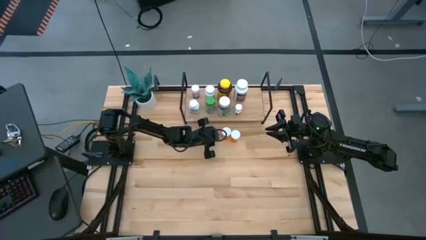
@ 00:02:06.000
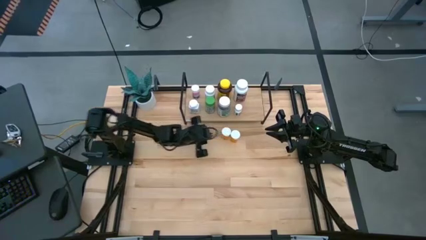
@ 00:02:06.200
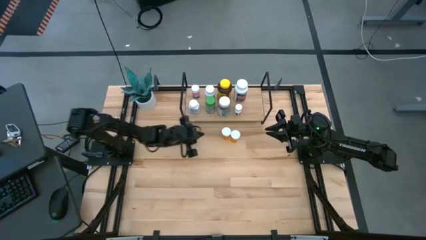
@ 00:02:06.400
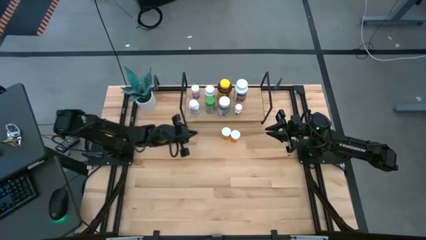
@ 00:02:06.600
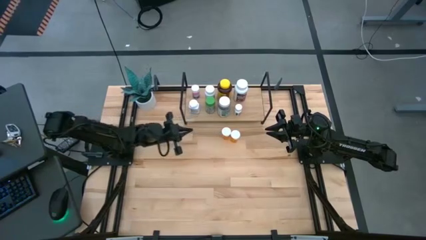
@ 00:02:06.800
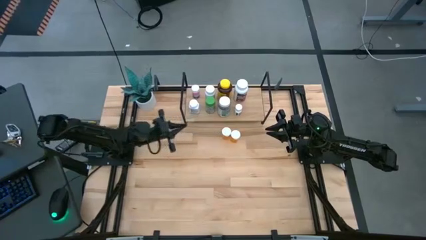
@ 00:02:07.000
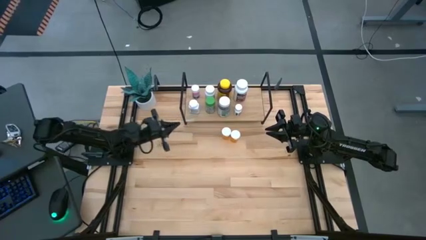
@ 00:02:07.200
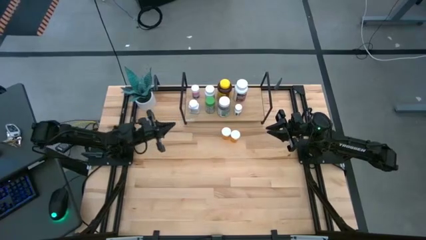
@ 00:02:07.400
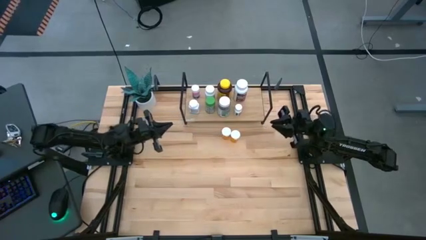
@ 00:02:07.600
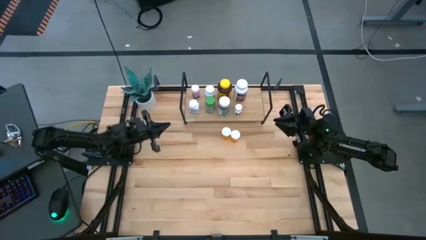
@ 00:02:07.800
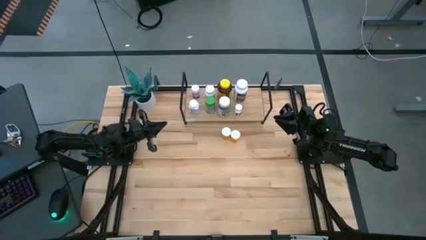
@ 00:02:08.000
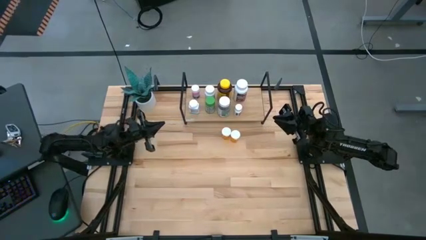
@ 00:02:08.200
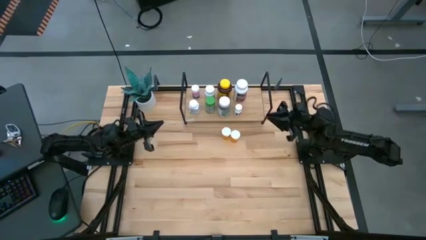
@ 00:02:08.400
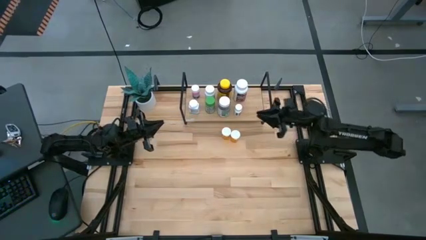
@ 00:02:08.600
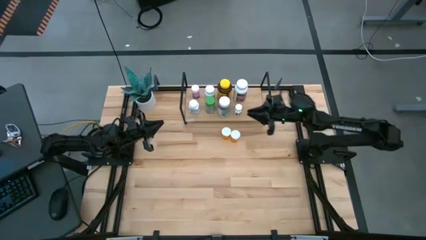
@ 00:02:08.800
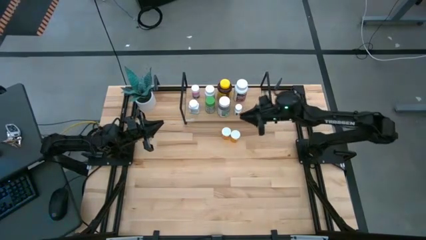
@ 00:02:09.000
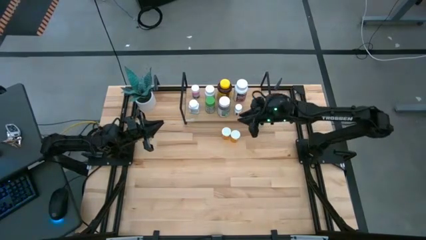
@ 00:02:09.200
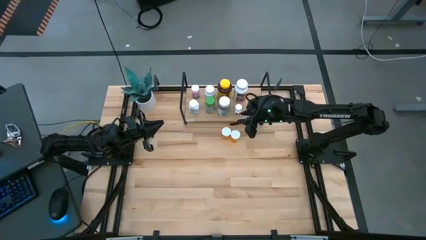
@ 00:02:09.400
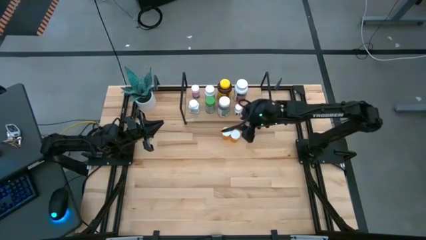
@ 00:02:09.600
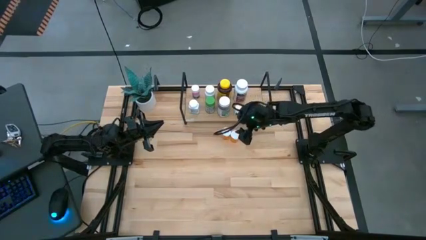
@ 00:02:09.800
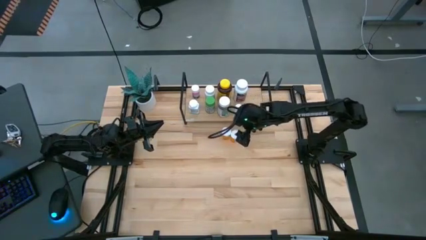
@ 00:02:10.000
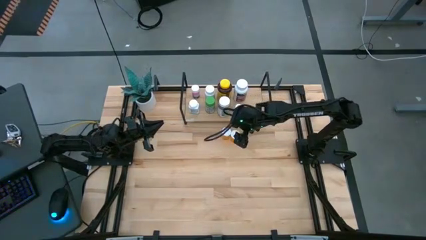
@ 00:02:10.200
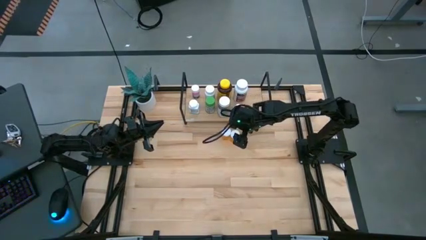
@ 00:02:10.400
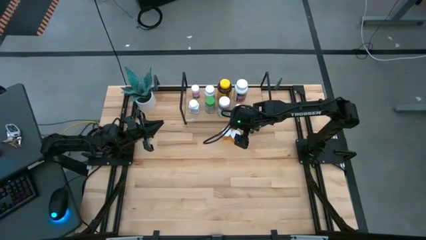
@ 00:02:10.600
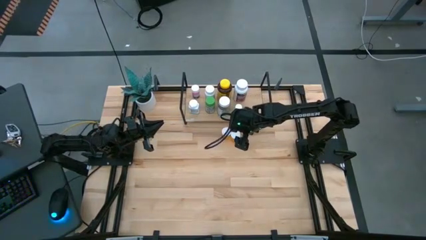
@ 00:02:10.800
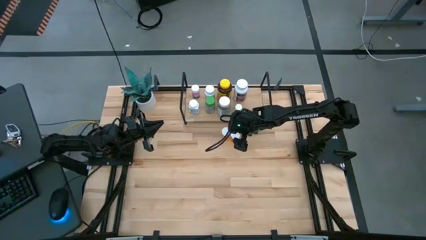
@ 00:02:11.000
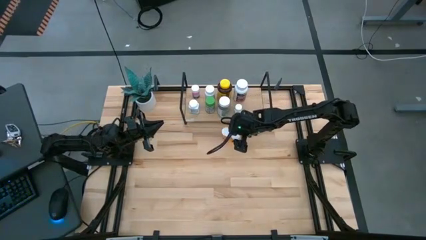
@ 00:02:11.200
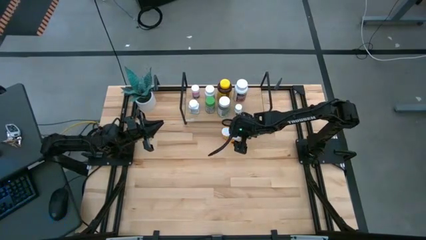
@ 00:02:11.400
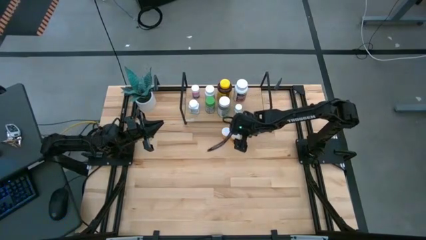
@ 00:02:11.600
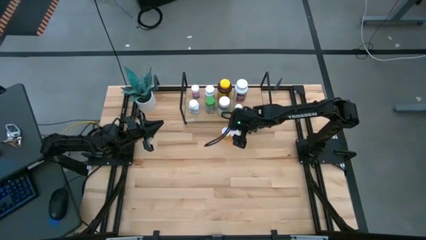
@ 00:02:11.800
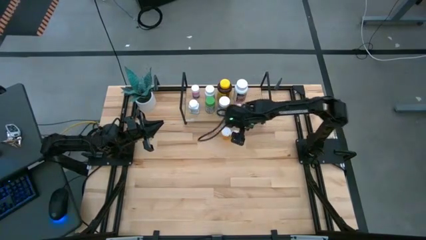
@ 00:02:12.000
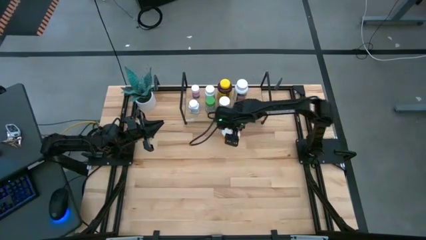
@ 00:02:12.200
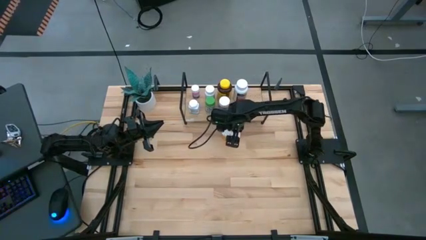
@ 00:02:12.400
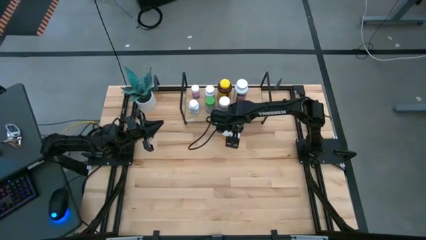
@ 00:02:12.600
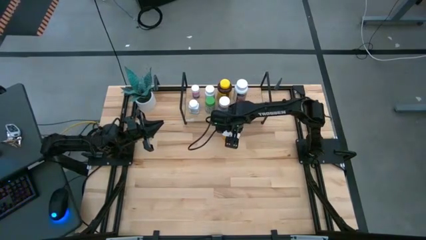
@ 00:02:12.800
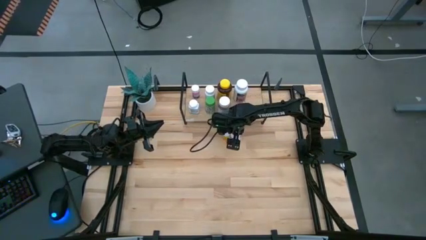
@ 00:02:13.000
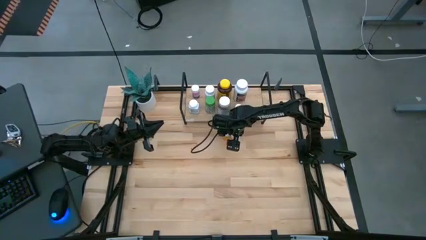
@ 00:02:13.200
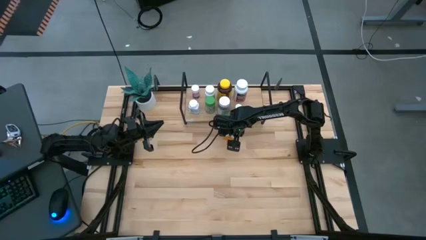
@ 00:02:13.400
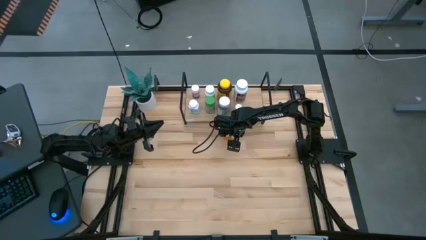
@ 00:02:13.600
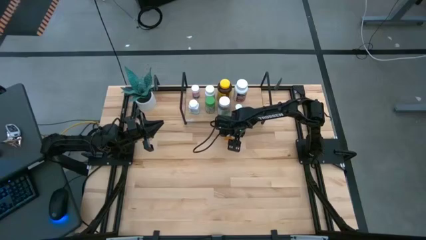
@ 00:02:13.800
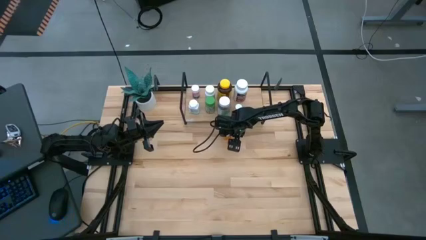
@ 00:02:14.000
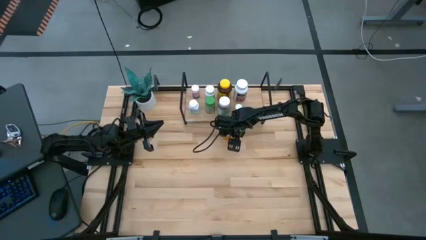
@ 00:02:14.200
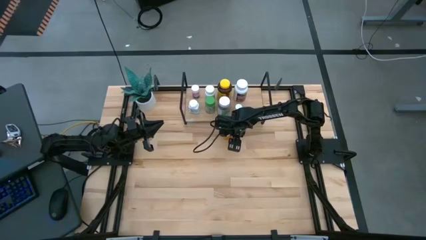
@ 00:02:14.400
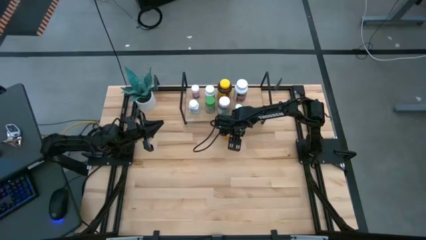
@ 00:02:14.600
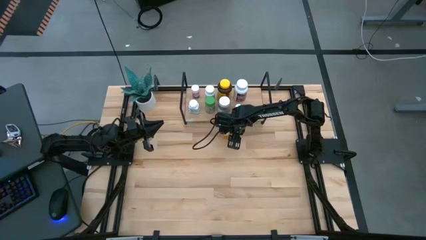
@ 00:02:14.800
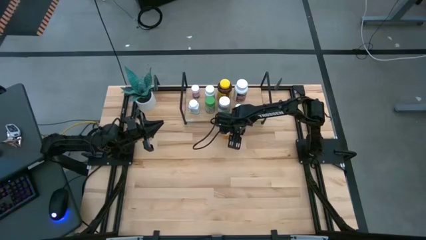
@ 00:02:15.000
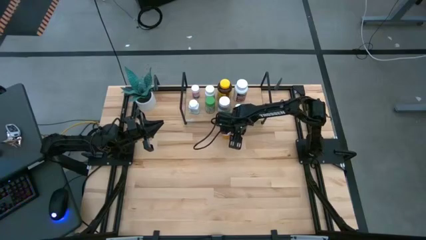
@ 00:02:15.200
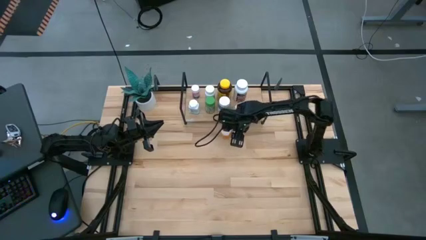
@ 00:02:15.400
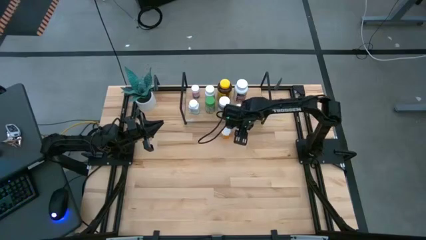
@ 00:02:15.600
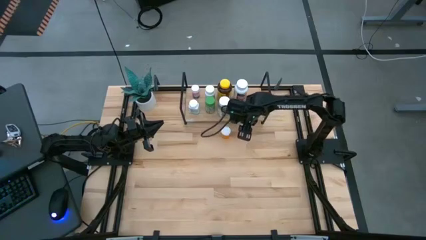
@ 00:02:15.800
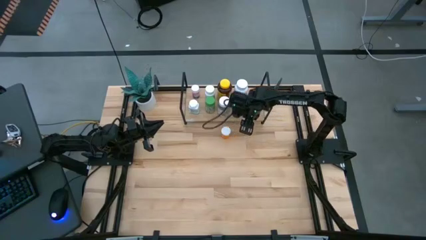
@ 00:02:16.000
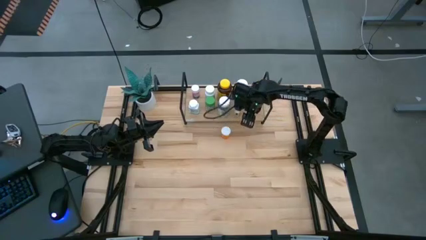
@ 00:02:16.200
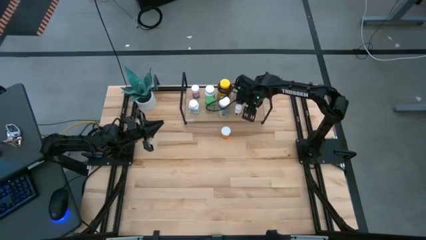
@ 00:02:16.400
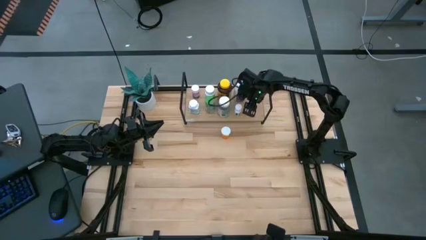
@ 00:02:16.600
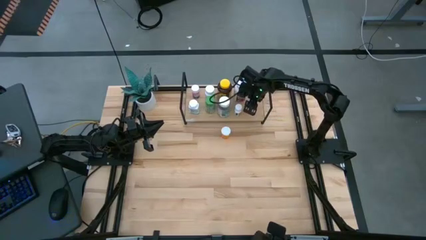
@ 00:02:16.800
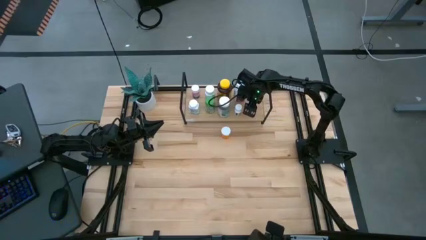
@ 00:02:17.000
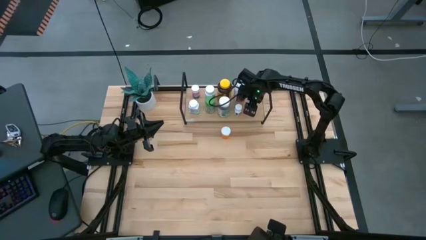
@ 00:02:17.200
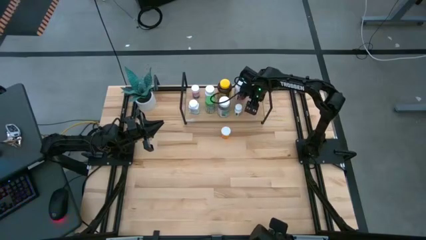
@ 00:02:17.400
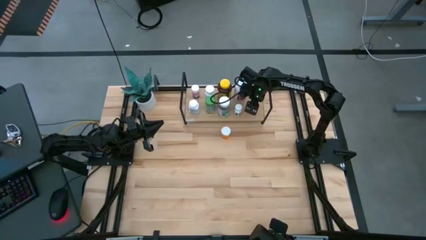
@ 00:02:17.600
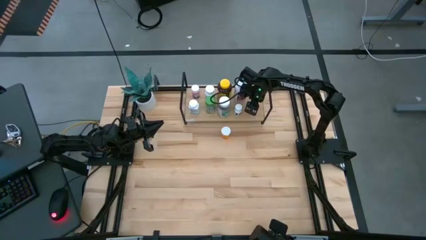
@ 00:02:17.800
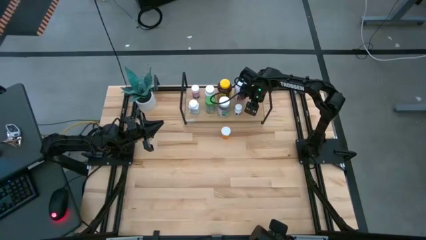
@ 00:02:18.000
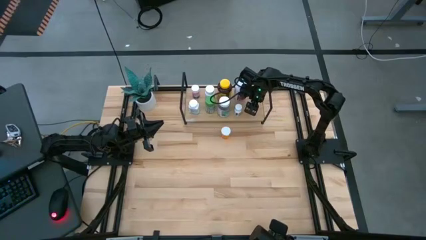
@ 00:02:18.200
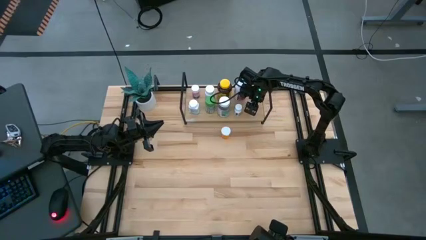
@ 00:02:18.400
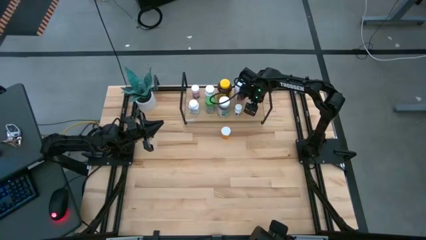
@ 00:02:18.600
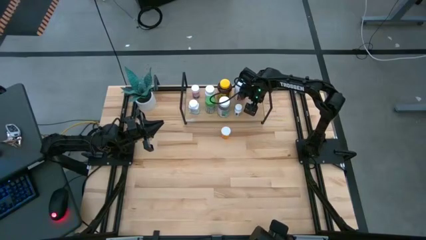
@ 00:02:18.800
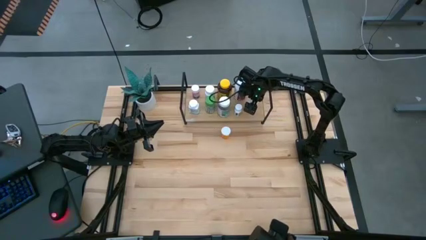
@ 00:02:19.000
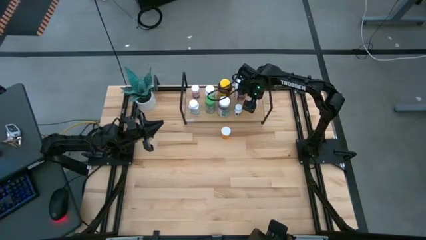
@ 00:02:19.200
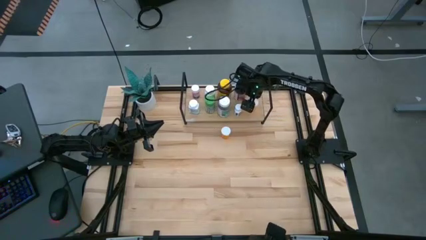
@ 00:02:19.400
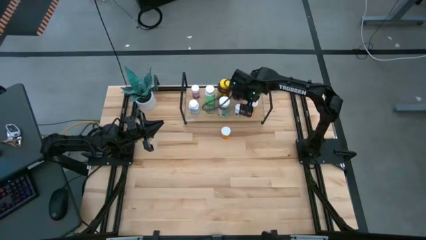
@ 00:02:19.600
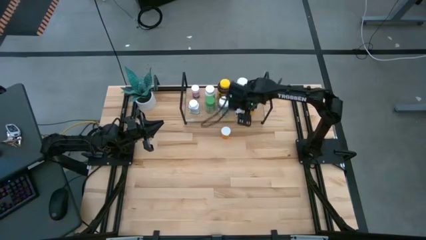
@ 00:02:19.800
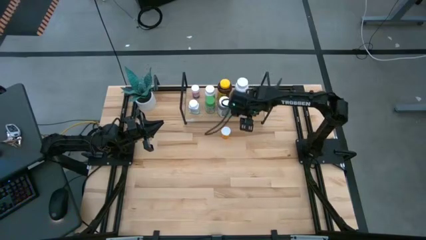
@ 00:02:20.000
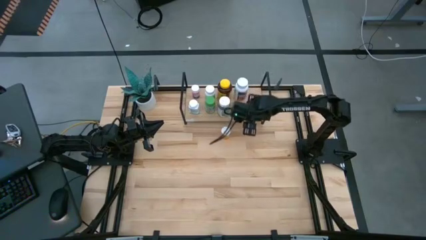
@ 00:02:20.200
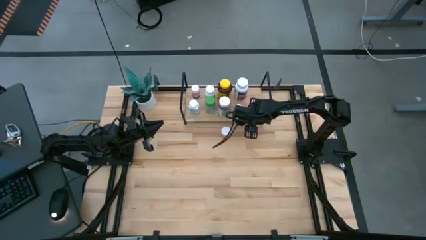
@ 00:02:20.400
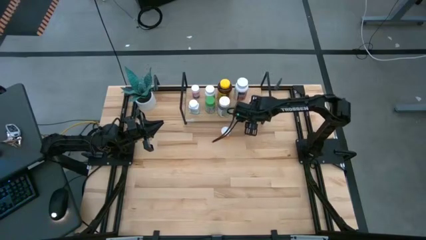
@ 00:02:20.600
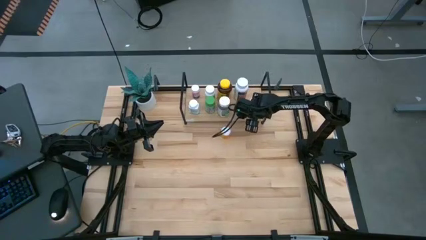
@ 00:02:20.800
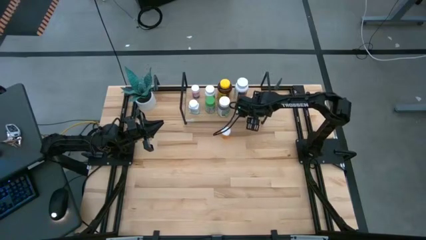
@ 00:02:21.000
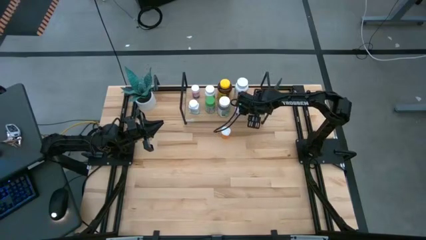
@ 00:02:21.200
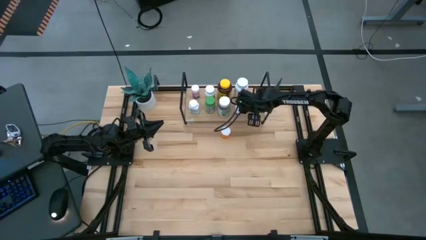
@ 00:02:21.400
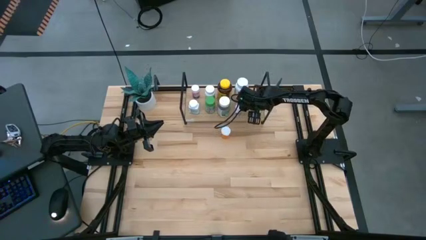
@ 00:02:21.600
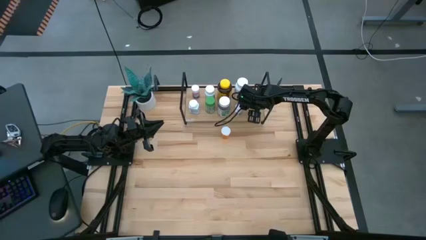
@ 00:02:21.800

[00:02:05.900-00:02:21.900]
Task: Pick and place medicine bottles onto shelf by color
Put the right orange pill bottle on the shelf
